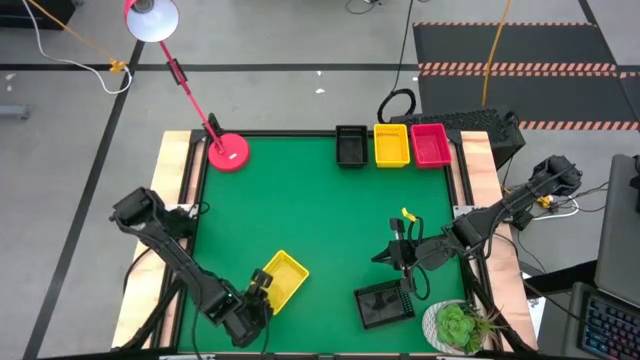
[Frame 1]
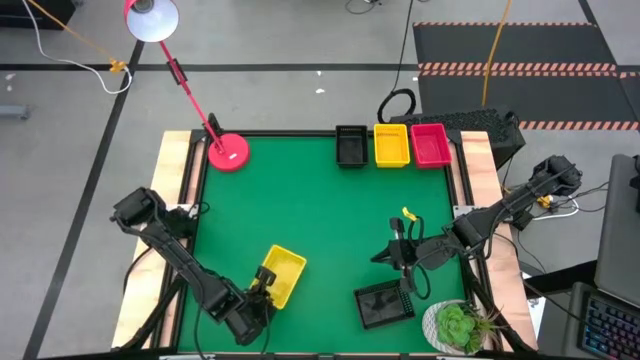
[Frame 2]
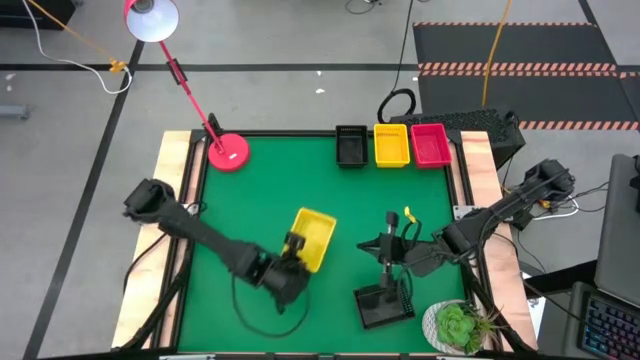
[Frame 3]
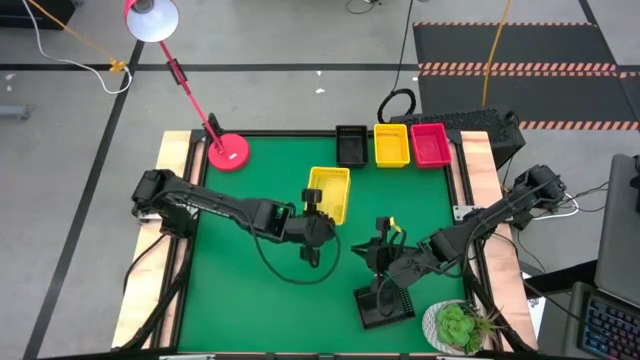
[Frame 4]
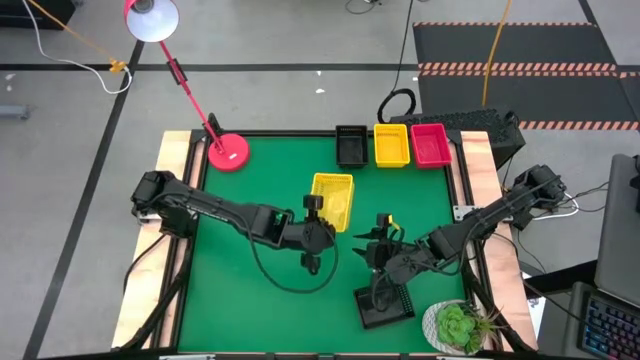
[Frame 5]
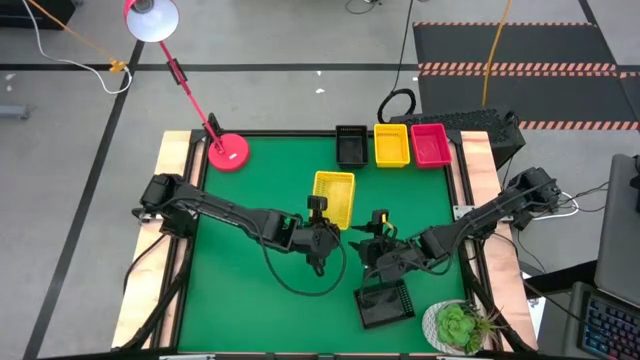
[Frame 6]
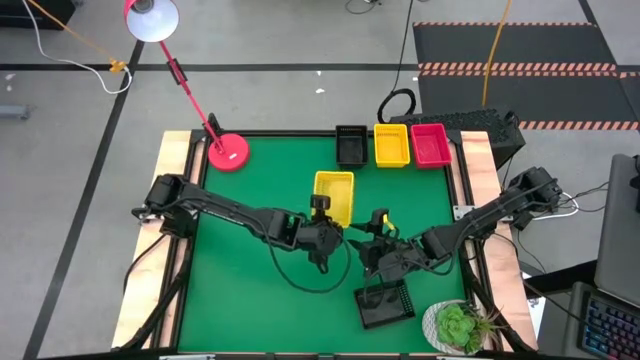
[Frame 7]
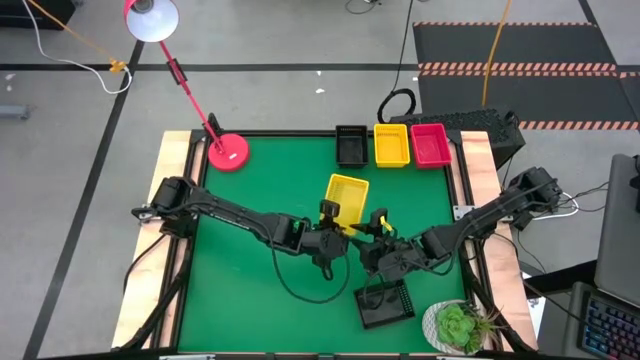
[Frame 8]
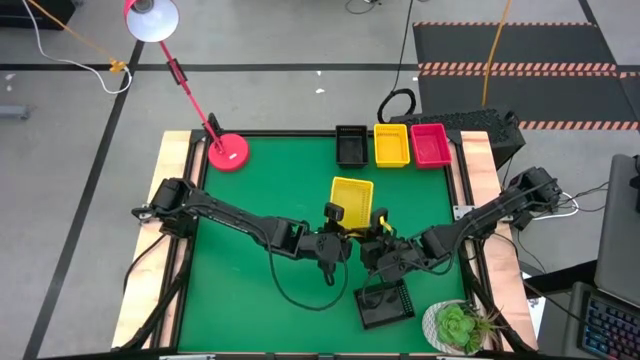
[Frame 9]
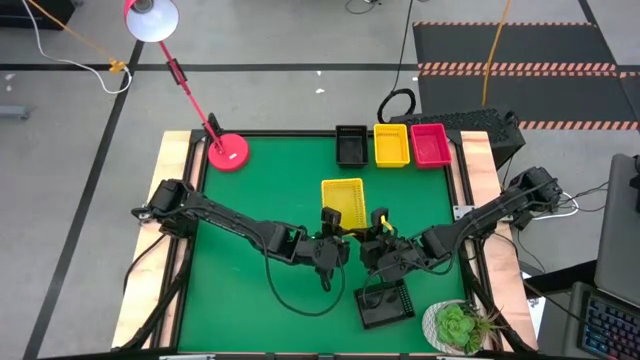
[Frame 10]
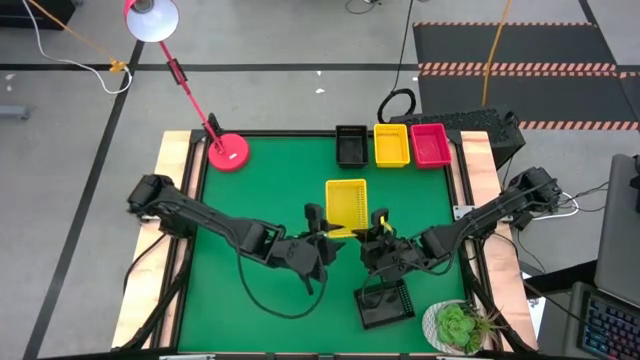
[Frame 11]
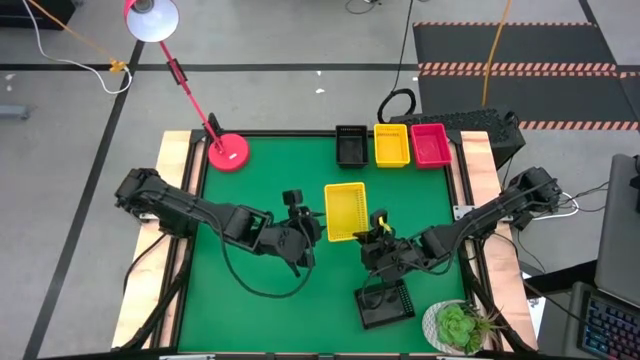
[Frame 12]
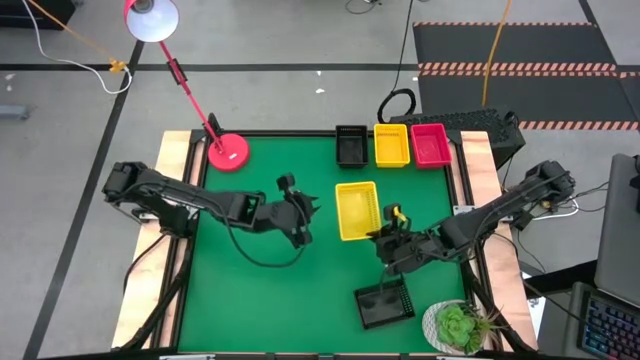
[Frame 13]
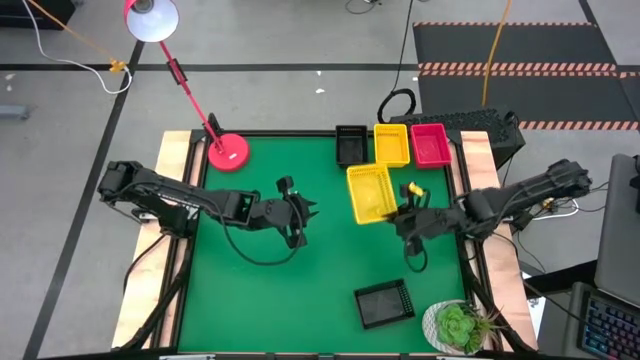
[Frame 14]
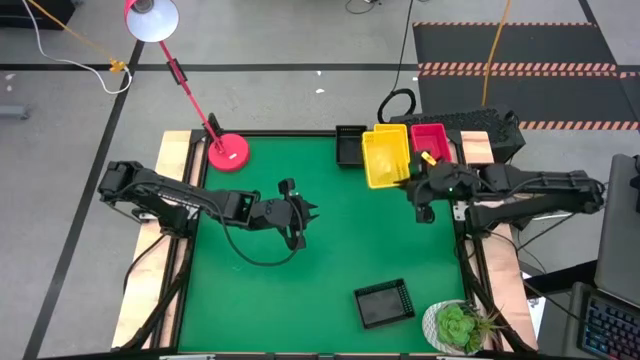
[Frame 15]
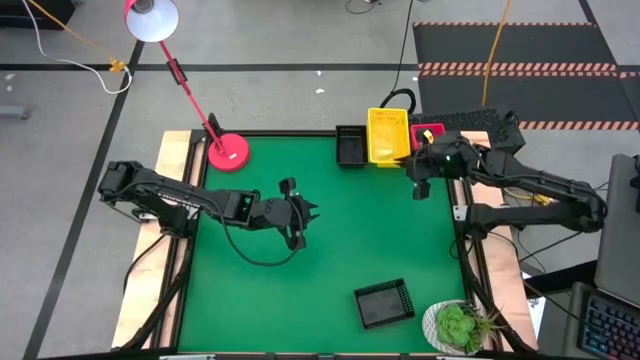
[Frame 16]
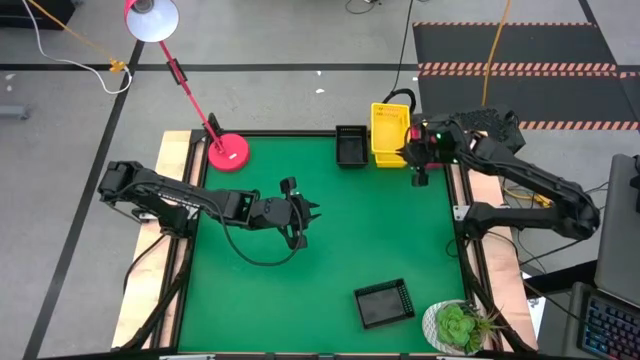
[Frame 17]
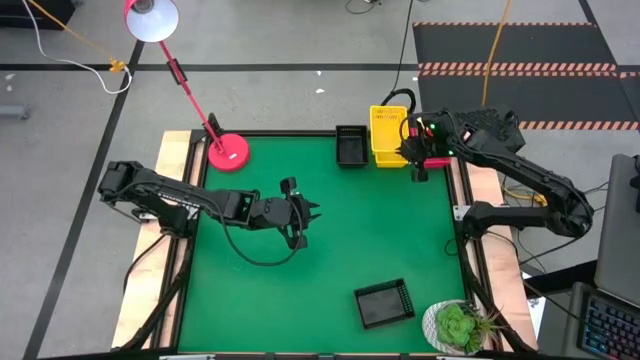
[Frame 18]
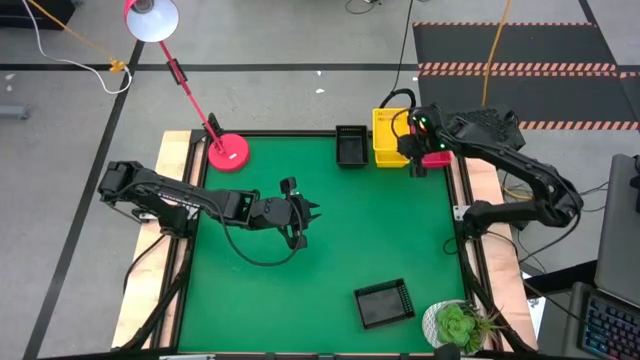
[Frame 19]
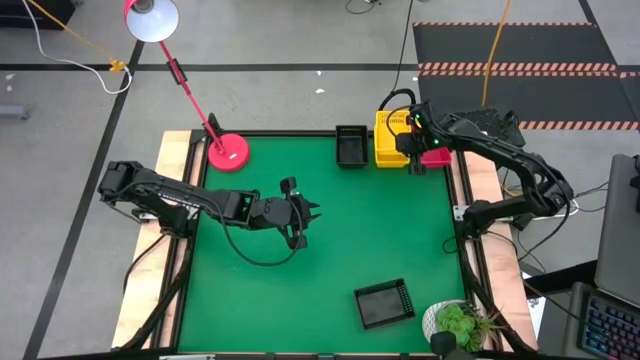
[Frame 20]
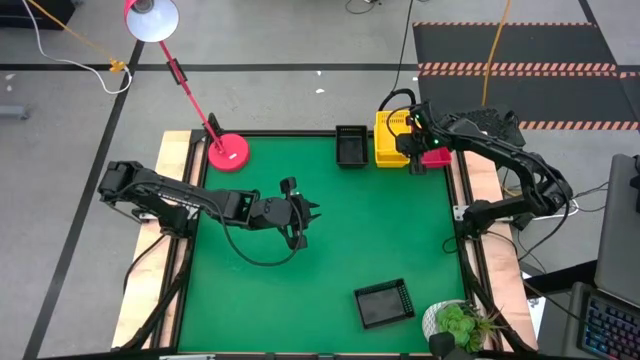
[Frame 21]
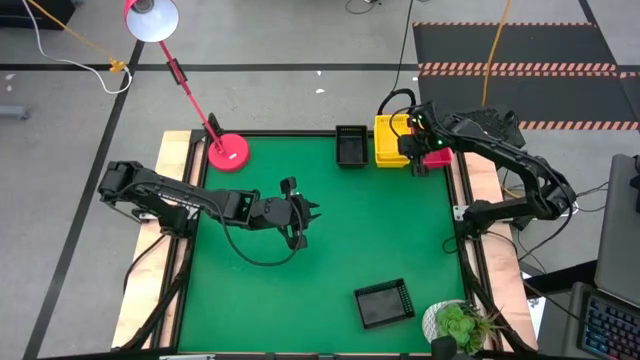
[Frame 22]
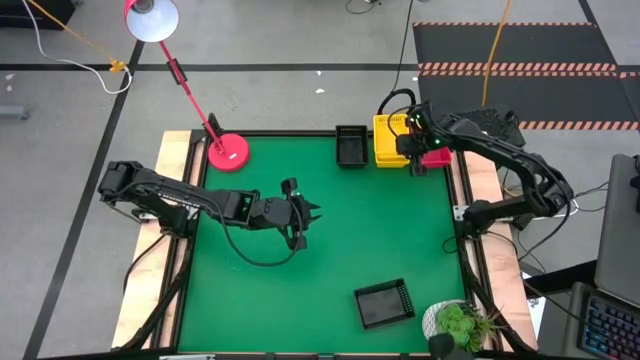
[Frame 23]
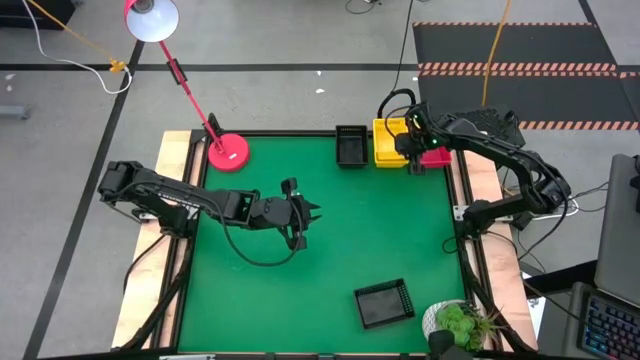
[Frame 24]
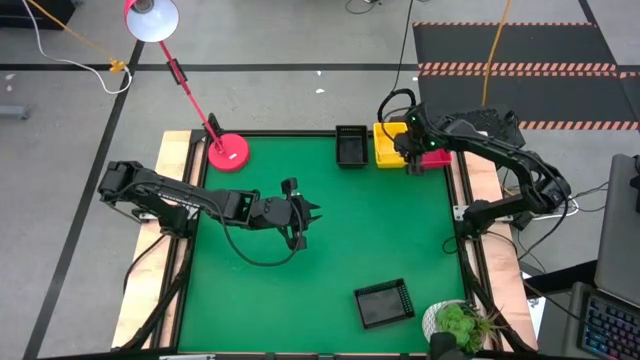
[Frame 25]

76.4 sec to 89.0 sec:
Stack the bottom yellow bin on the top stacked yellow bins
